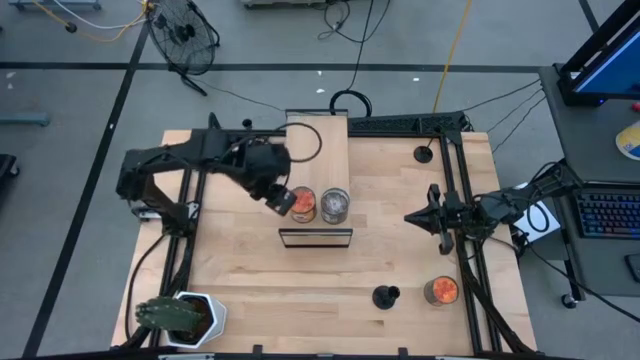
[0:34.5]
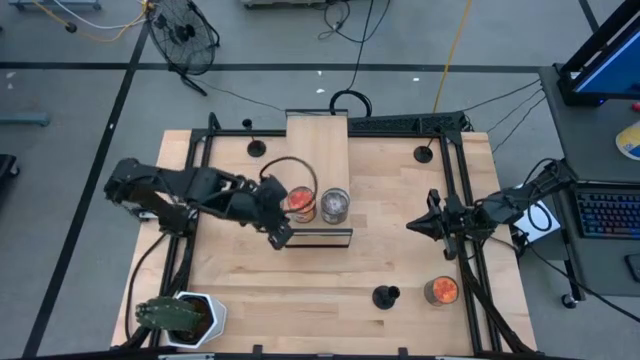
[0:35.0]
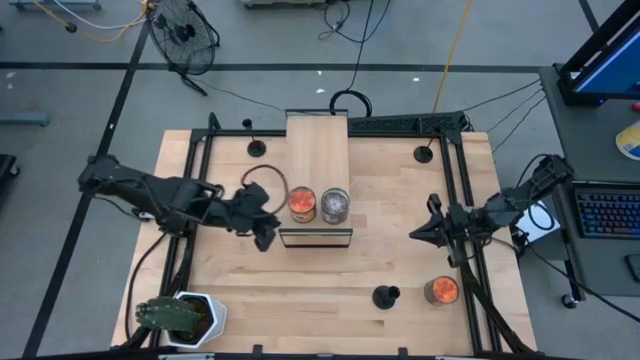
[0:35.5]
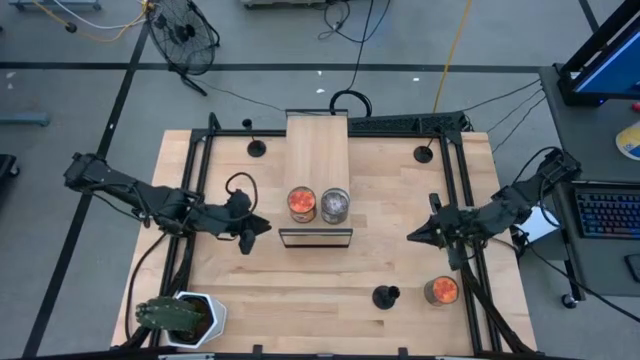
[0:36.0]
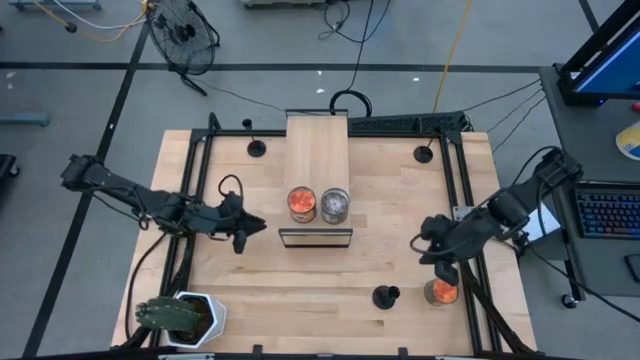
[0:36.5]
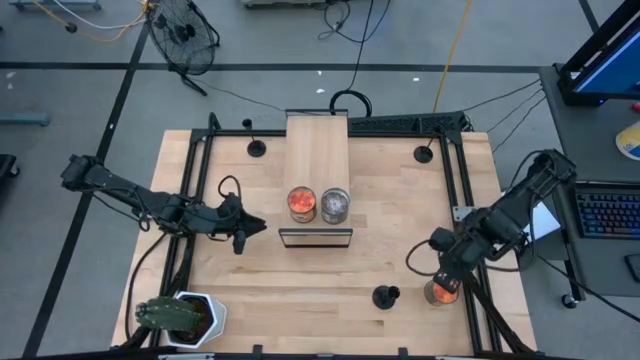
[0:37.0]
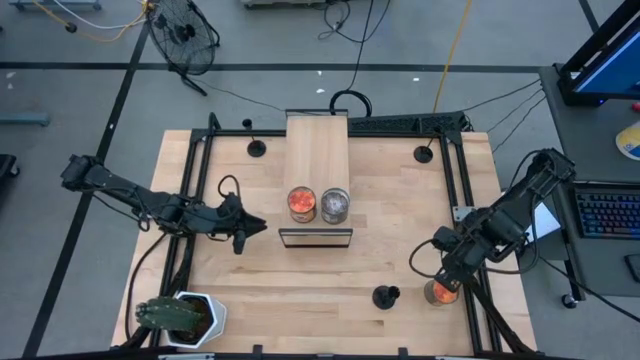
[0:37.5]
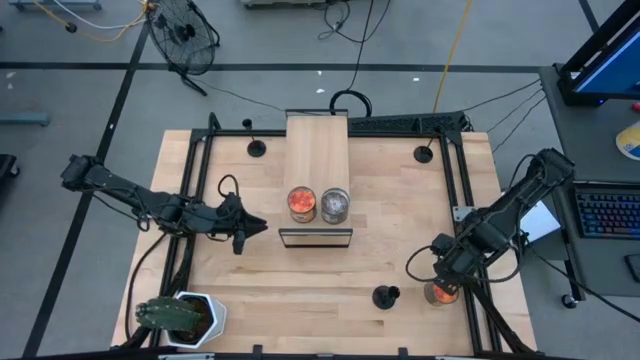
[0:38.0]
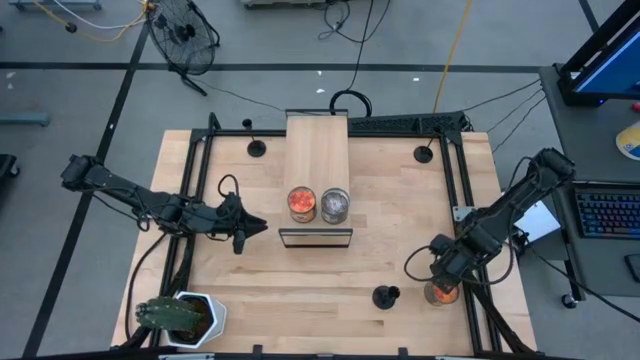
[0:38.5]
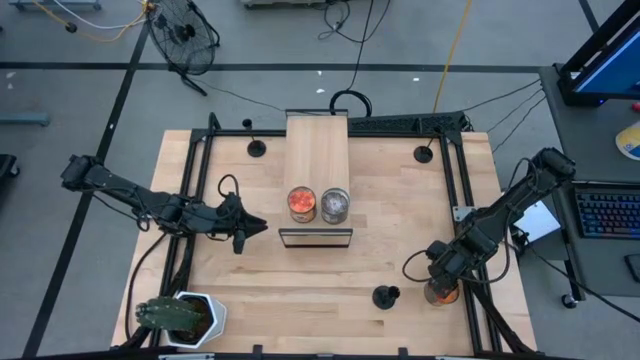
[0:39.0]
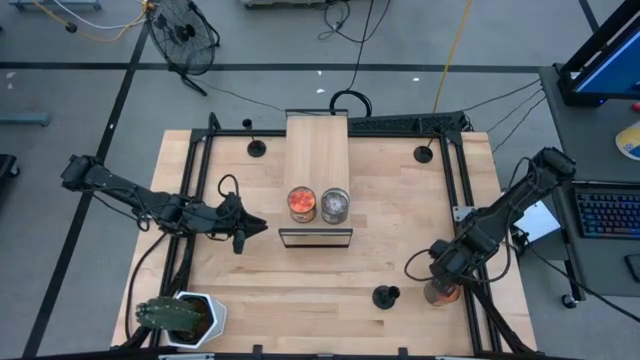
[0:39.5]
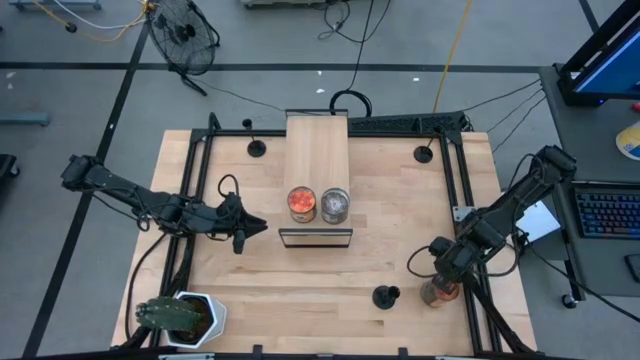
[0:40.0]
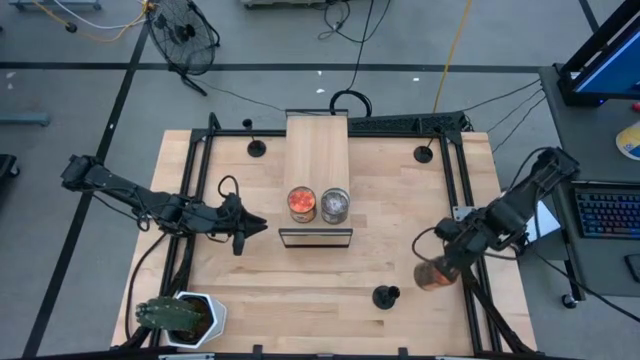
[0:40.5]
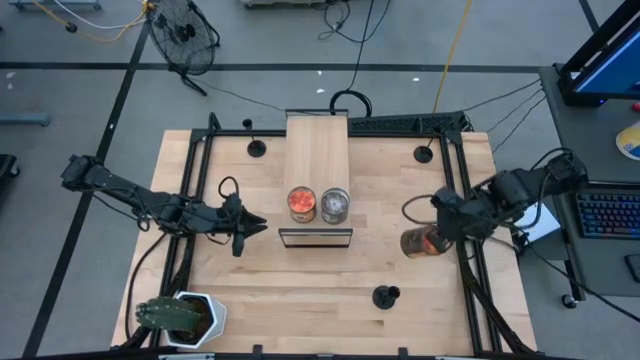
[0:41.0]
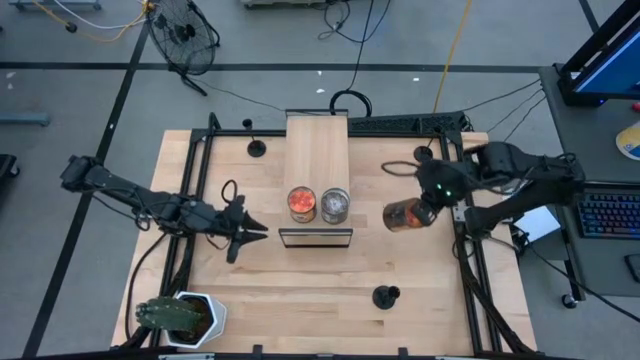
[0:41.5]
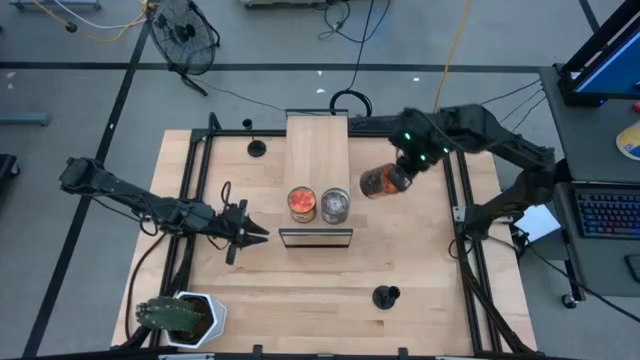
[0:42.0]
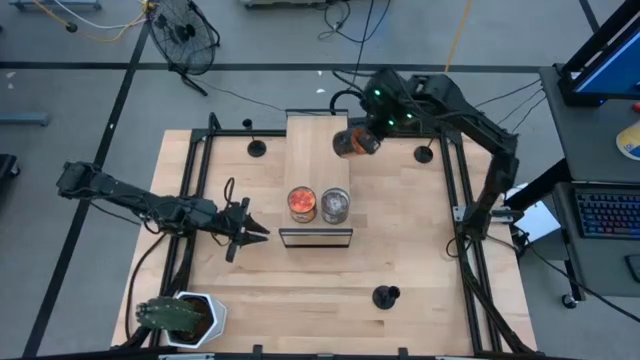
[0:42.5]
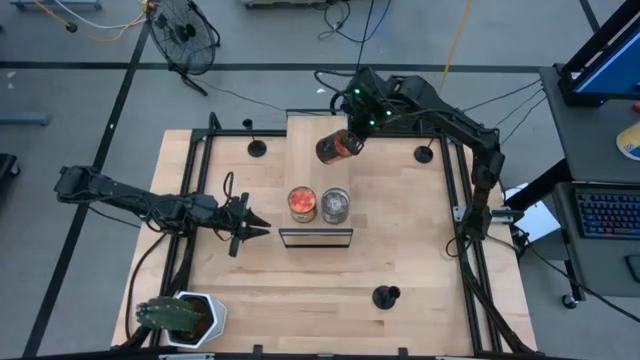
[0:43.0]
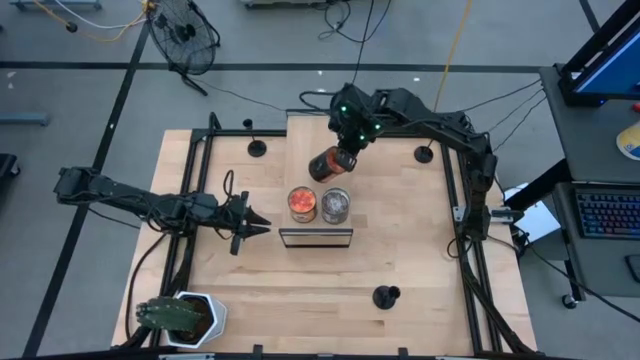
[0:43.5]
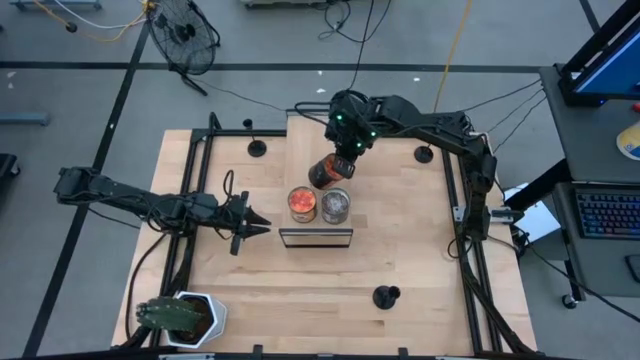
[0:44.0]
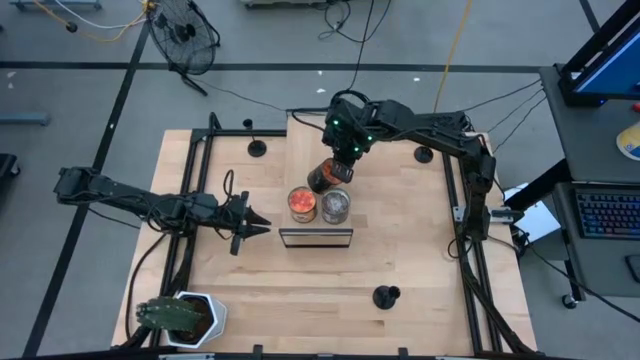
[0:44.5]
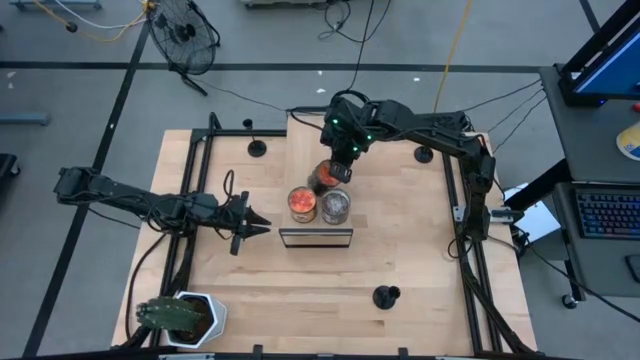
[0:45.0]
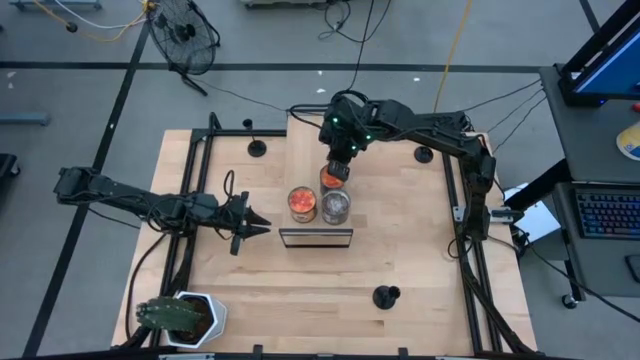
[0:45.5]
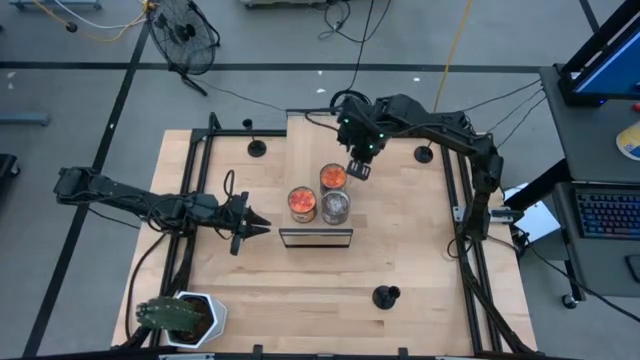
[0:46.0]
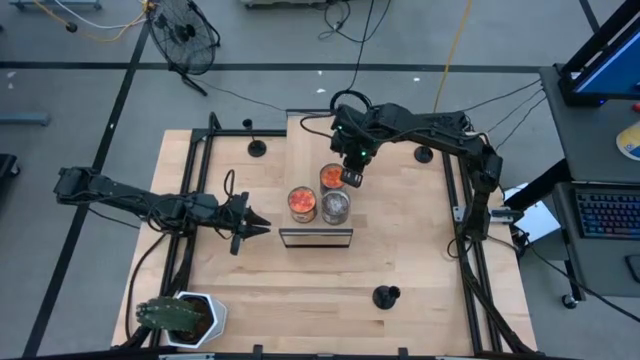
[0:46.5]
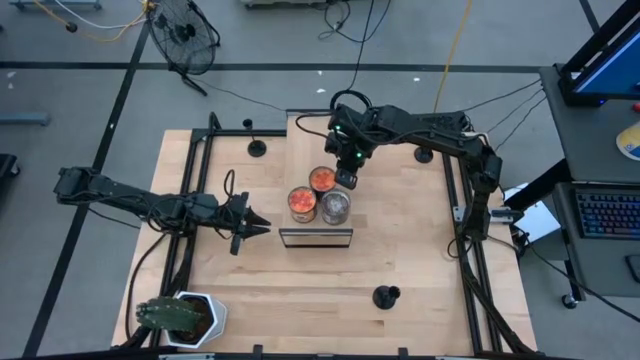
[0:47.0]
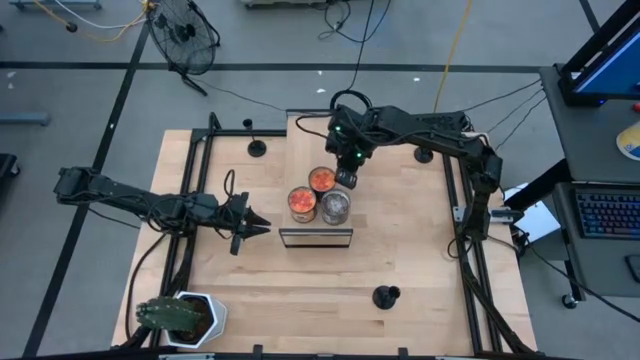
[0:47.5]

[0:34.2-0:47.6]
Task: Pick & Place candle stick holders
Put the orange scented candle on the shelf

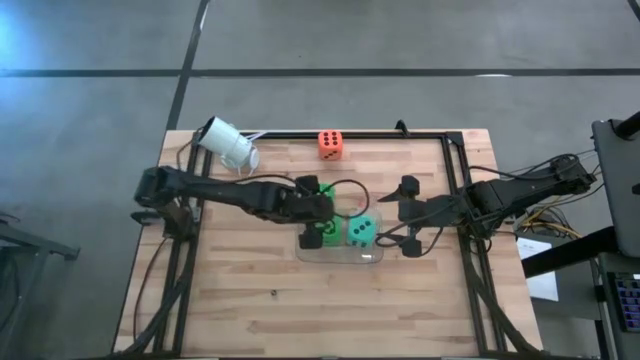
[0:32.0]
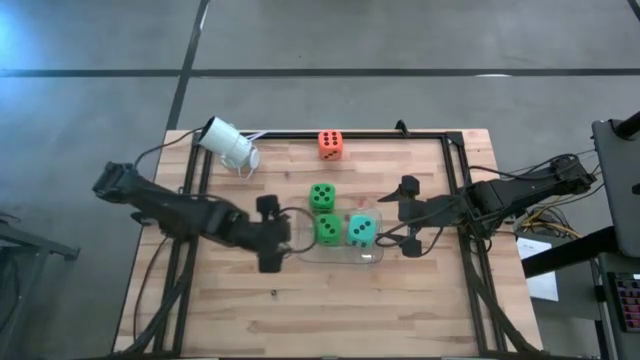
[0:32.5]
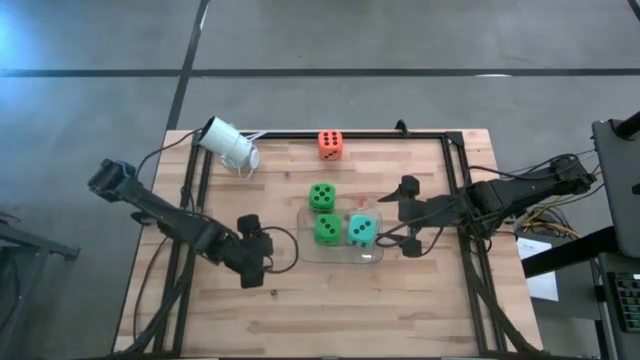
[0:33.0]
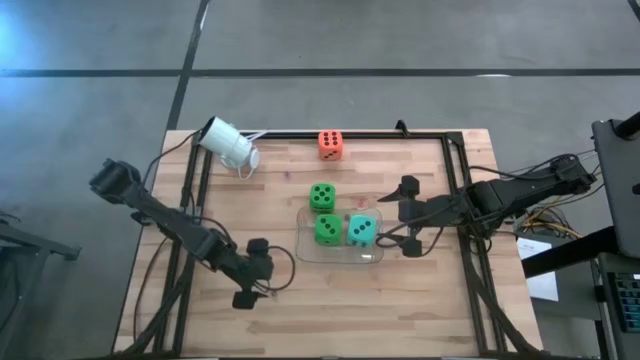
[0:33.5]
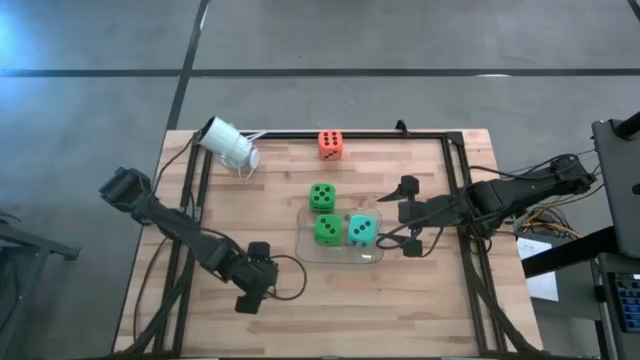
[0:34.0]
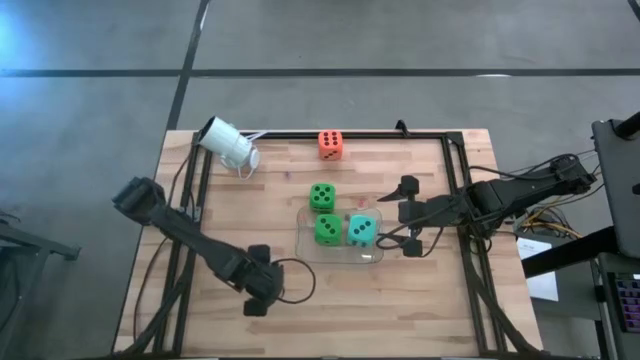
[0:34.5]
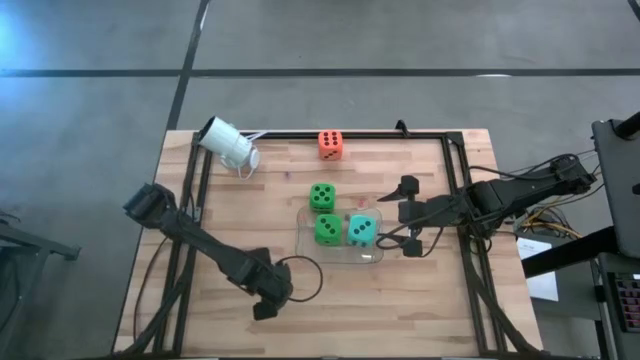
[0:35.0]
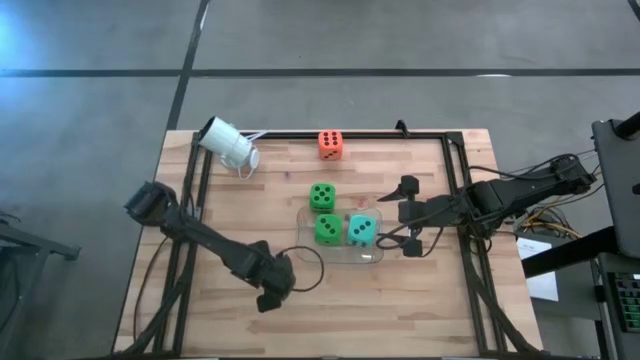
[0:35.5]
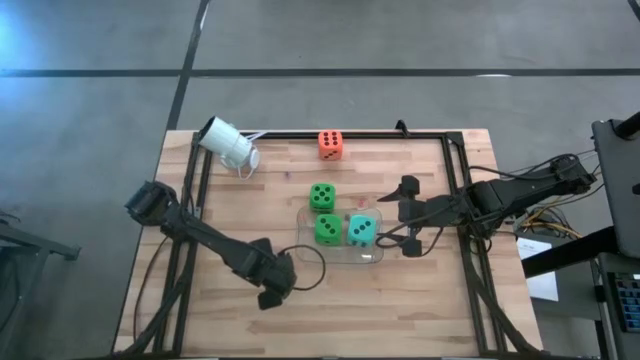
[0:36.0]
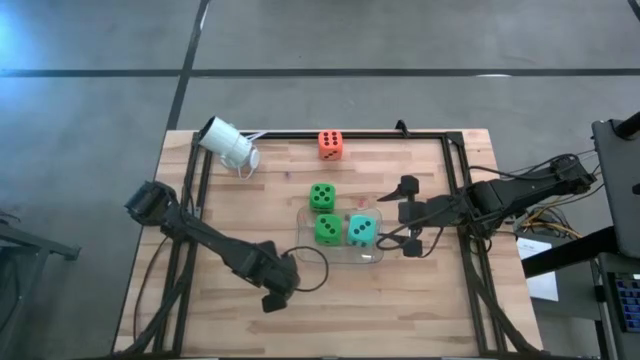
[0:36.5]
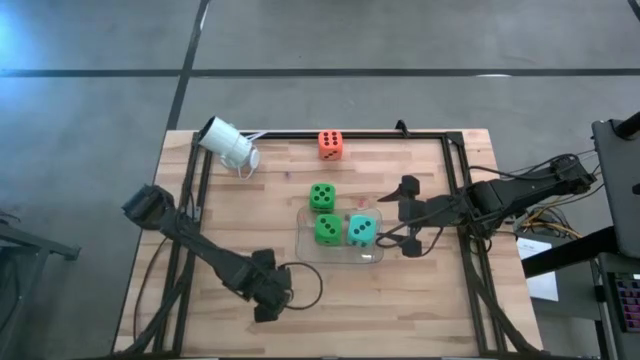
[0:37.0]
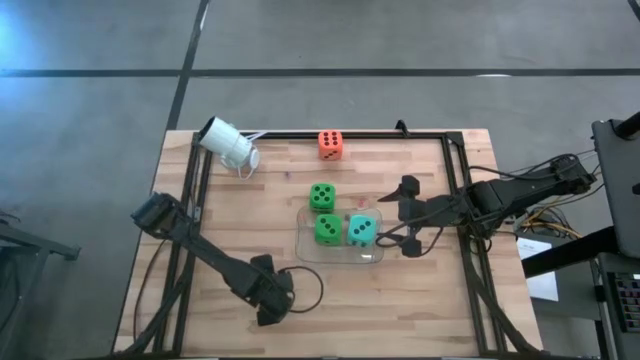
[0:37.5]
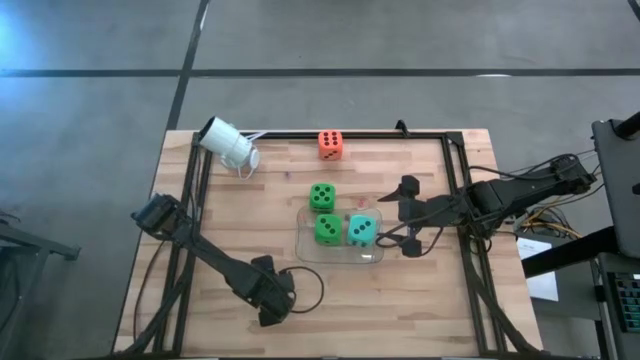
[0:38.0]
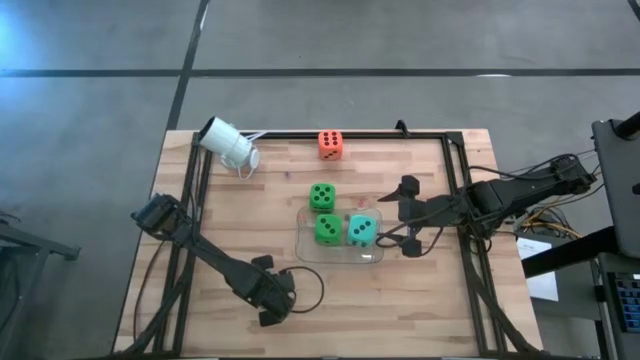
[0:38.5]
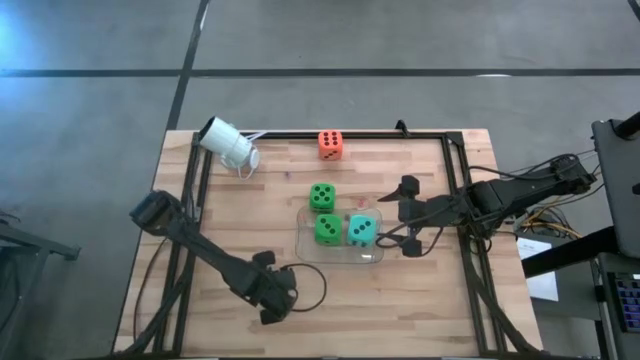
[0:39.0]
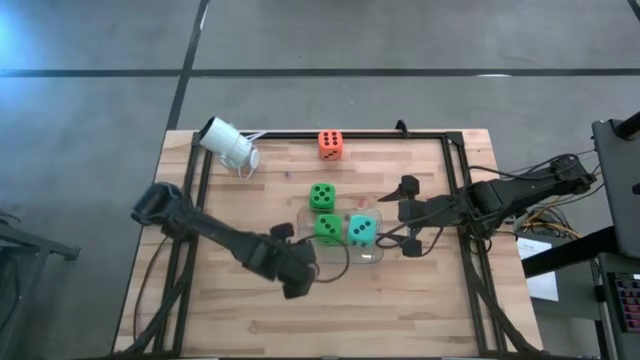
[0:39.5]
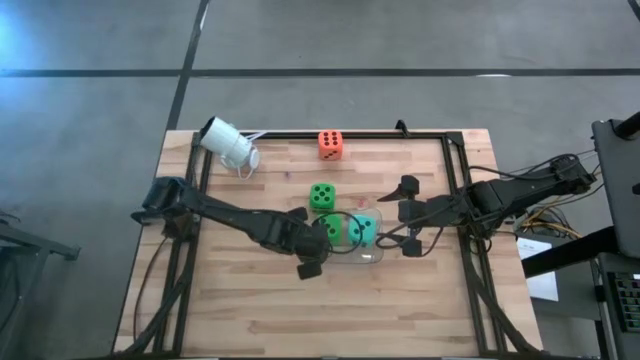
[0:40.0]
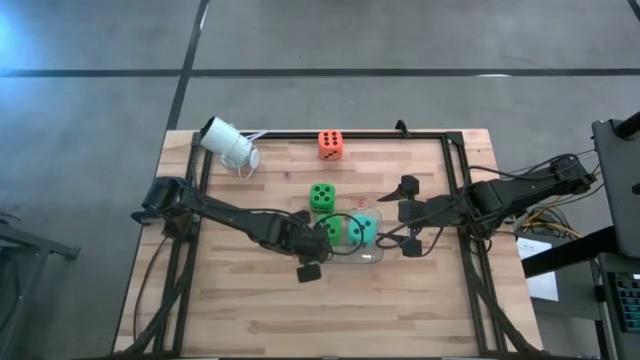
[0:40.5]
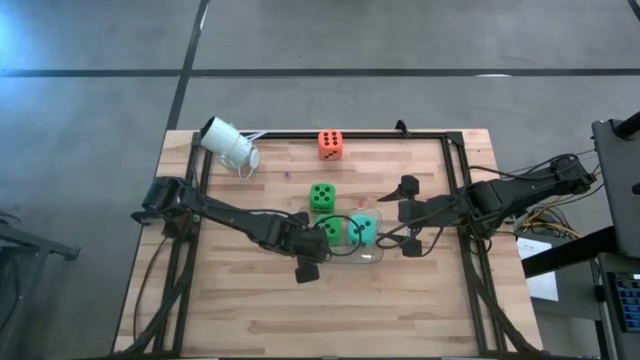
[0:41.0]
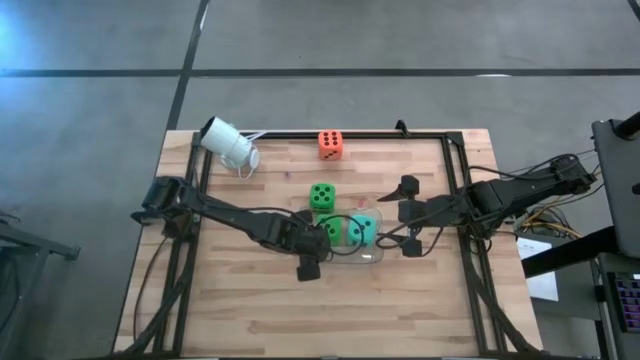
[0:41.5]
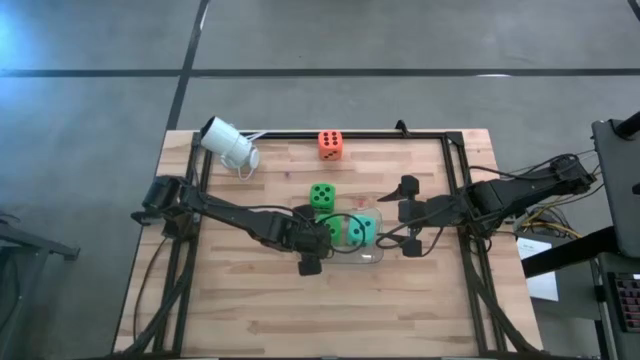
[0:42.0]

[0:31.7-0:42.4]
Task: Pick & Place Dice
Put the bottom small black die into the transparent bin
